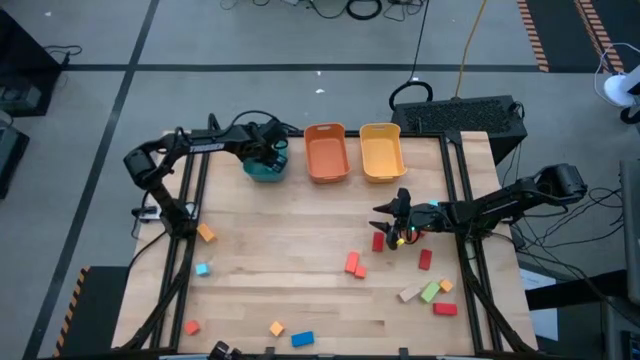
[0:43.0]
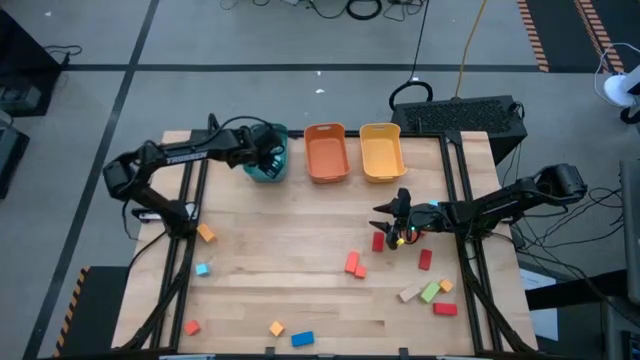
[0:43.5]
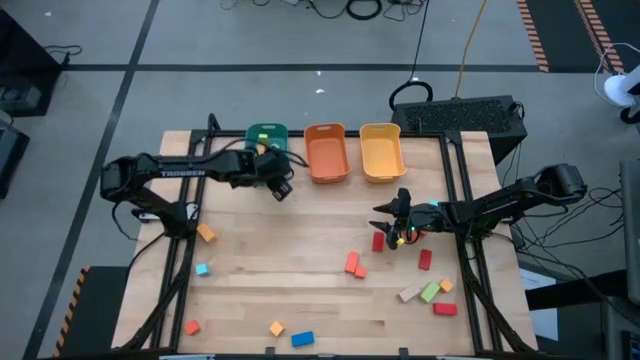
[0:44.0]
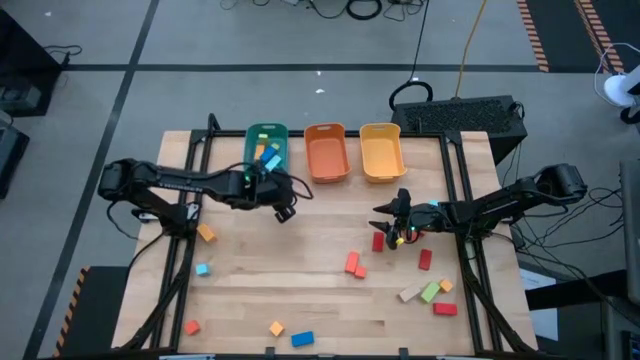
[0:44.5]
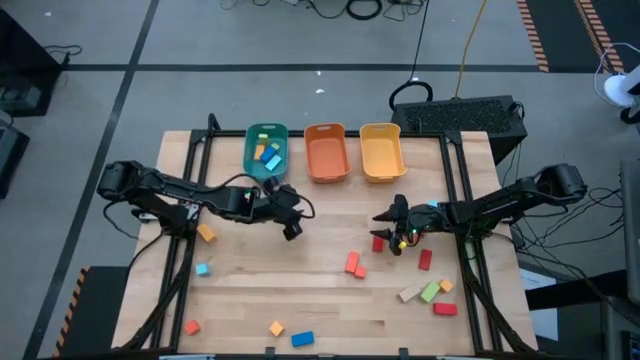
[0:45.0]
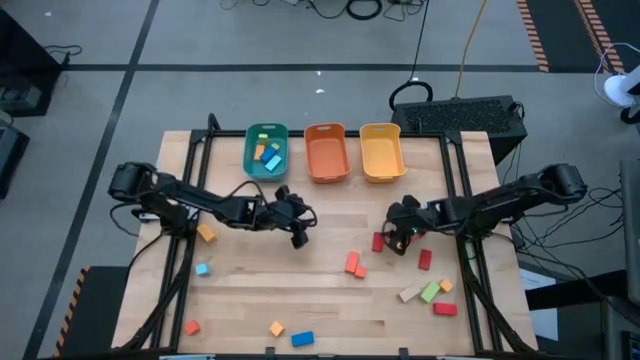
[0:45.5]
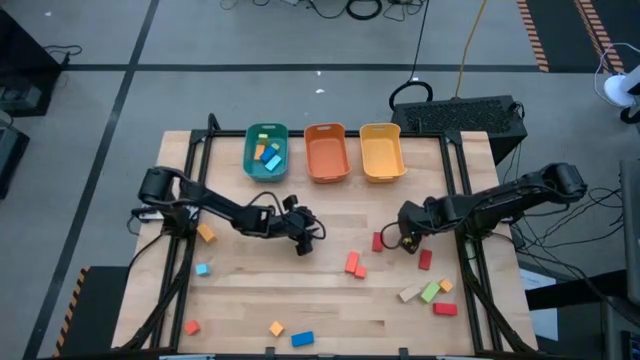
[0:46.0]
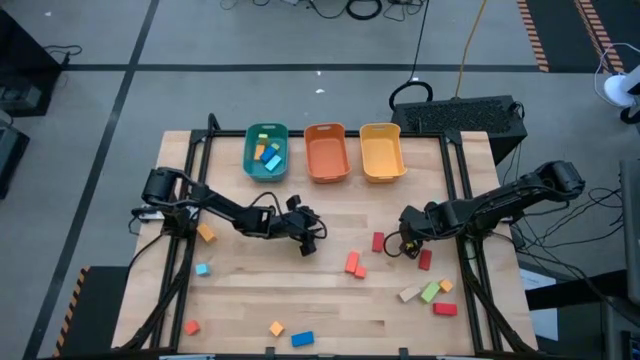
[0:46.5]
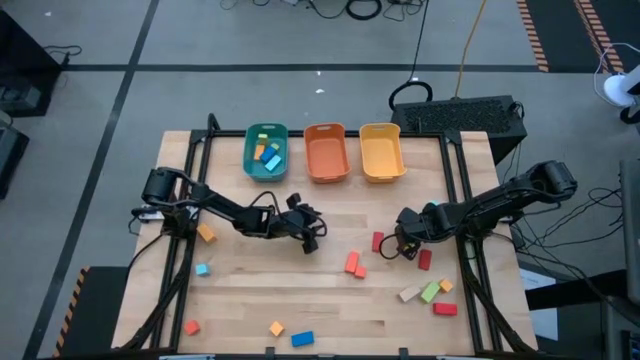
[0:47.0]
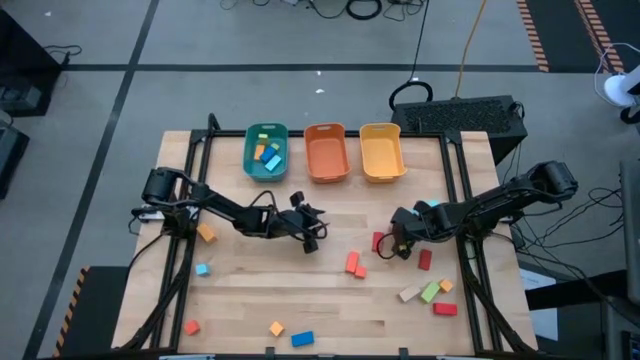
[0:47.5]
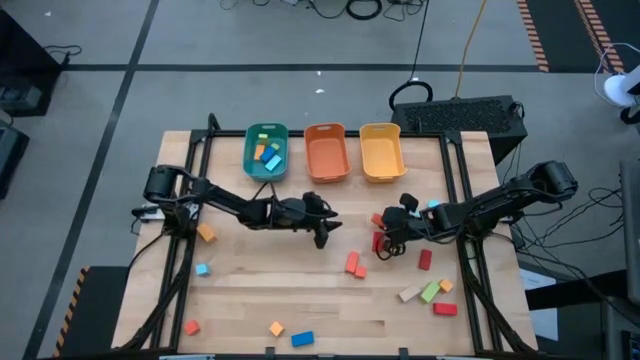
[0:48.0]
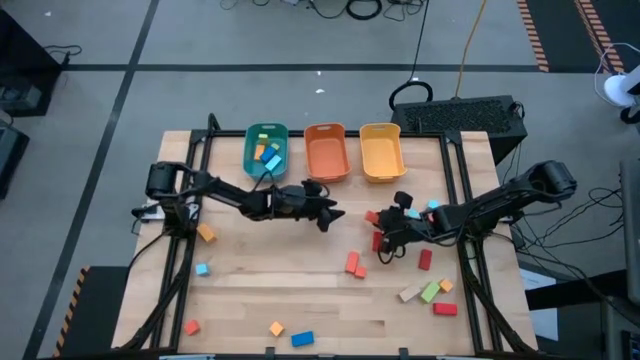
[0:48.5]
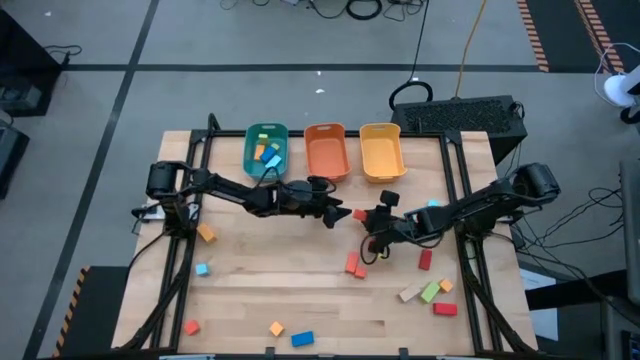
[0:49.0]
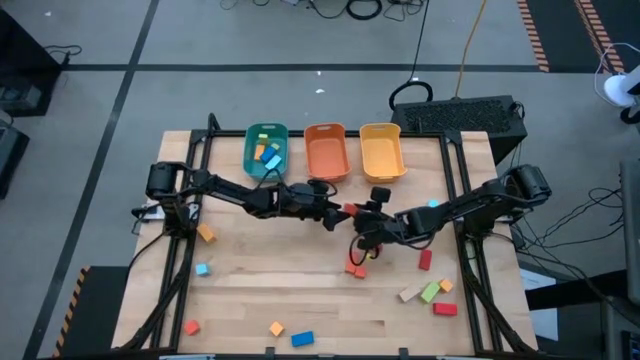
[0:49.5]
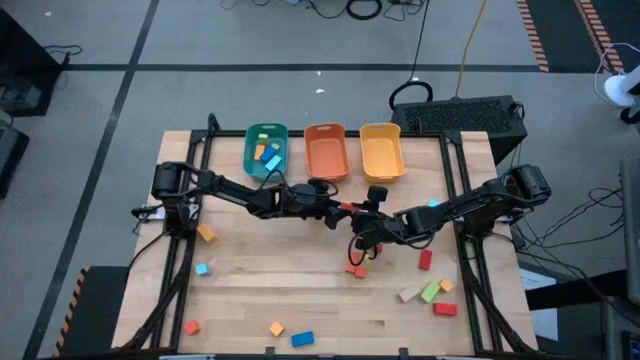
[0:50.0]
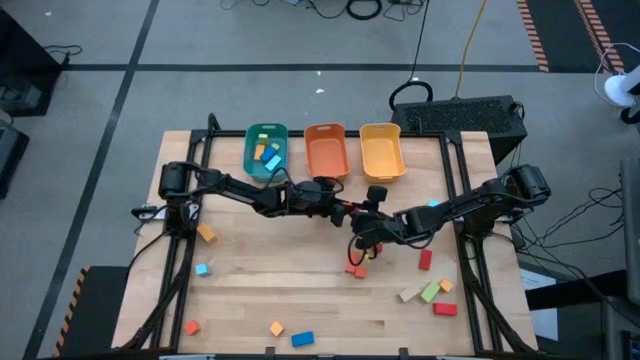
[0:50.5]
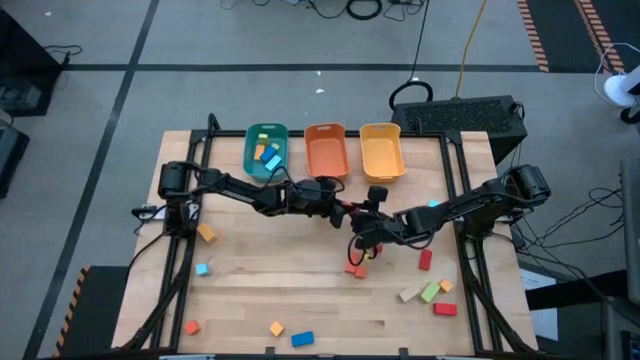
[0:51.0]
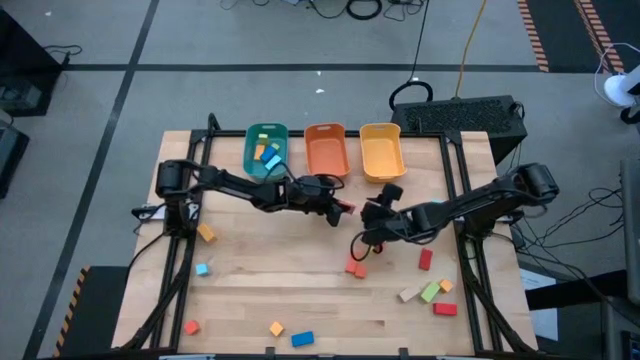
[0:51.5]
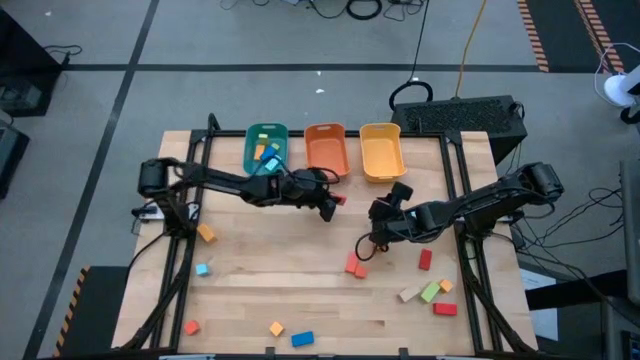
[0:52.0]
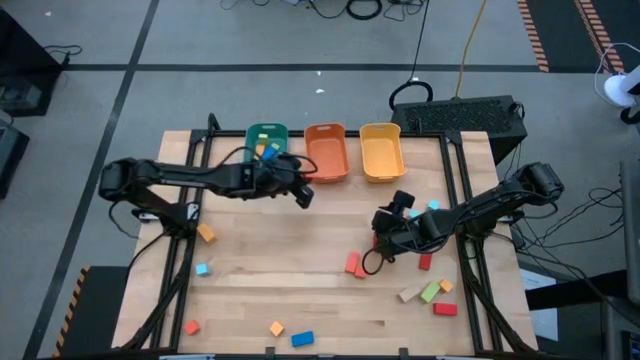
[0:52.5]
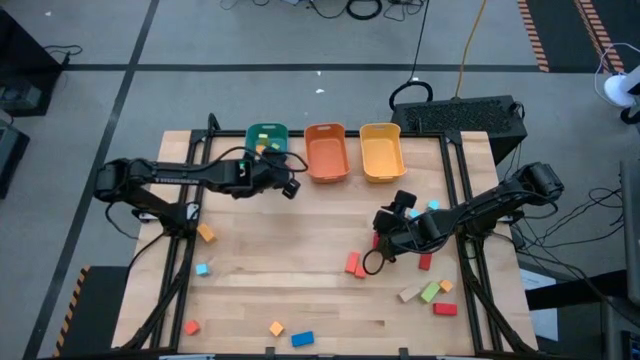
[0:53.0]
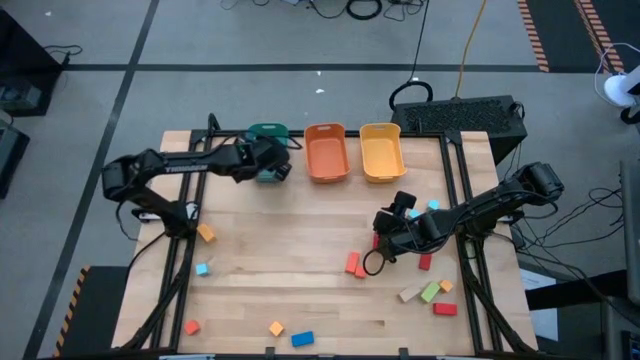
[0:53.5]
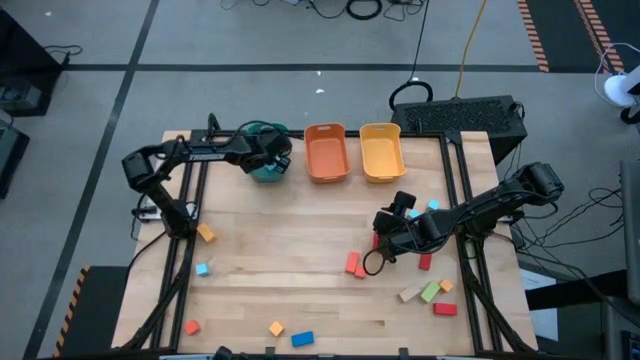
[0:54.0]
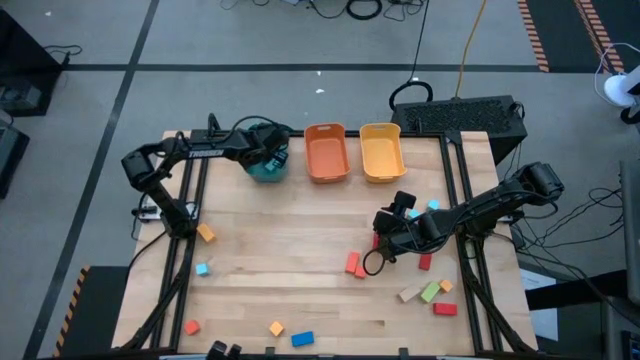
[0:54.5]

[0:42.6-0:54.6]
Task: Sort blocks by size
Put the right orange thin rectangular block into the blue bin

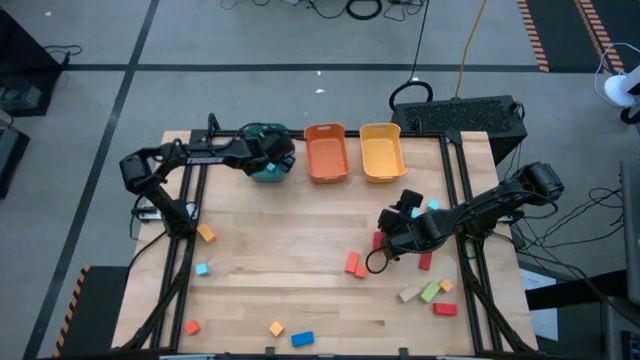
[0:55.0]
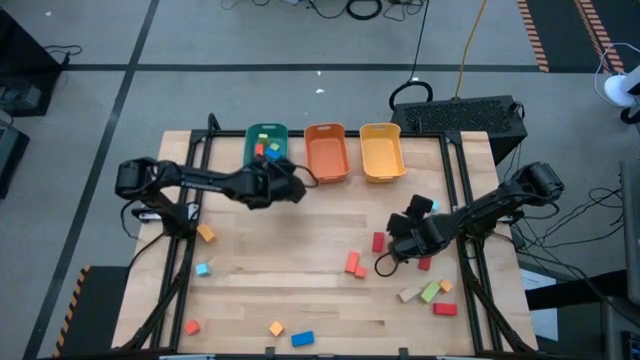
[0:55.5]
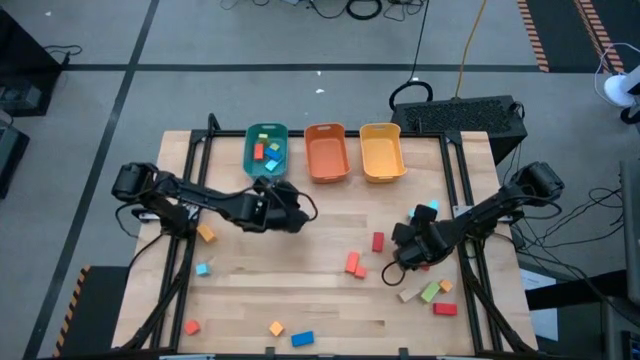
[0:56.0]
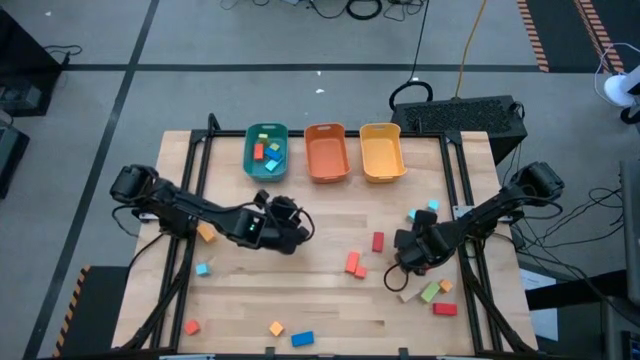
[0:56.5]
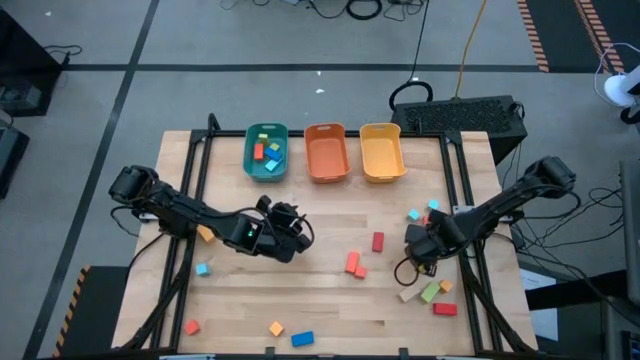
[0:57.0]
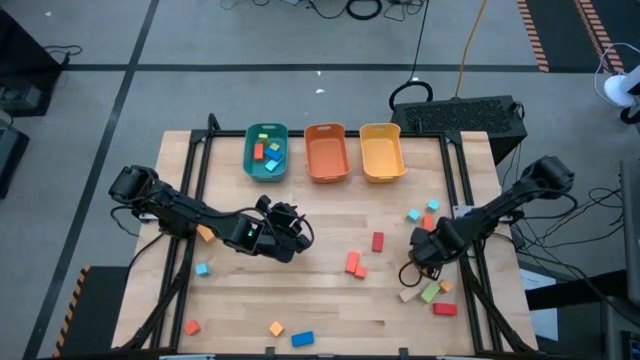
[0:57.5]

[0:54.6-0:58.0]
Adjust the right red thin rectangular block

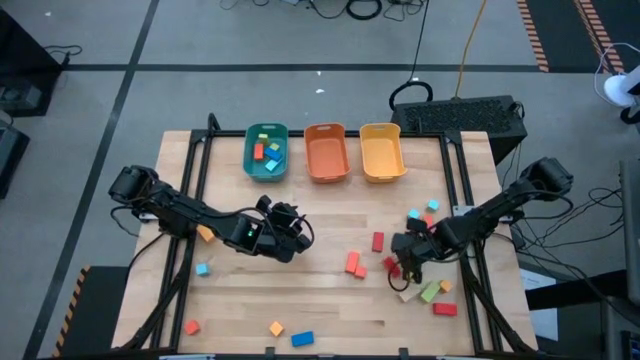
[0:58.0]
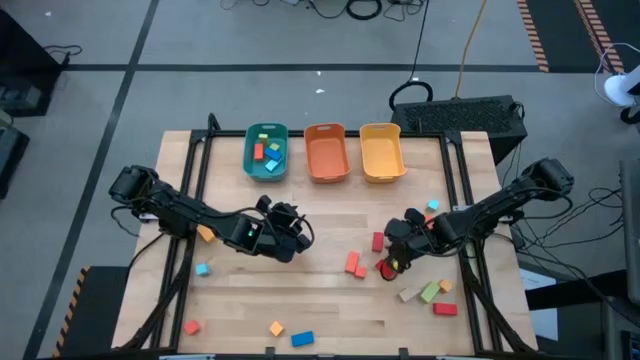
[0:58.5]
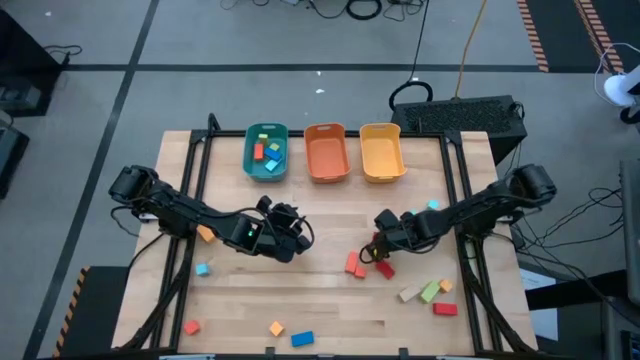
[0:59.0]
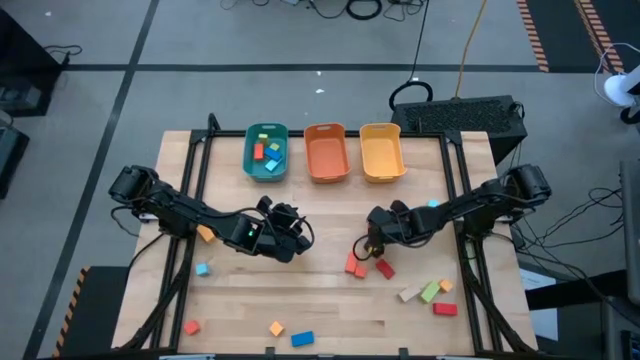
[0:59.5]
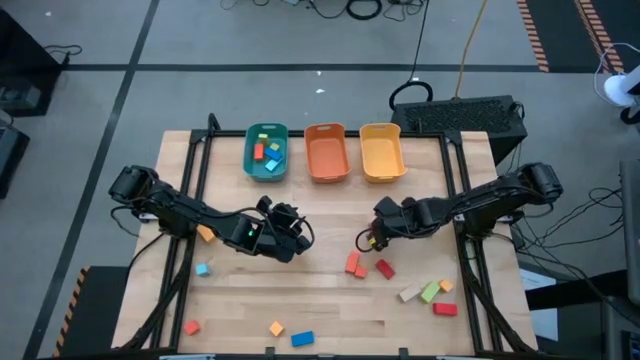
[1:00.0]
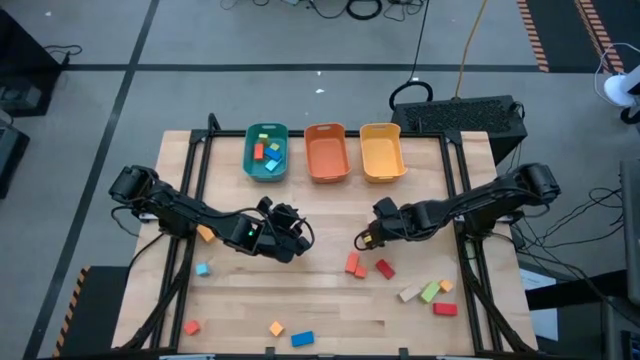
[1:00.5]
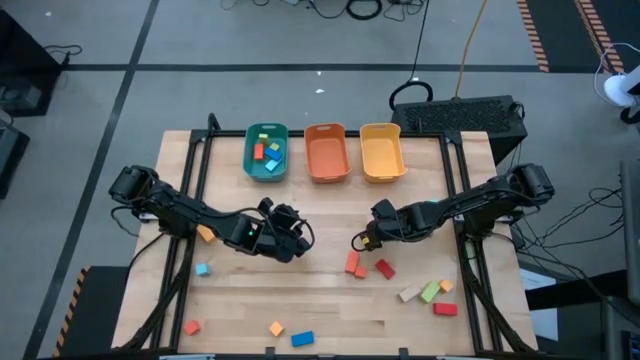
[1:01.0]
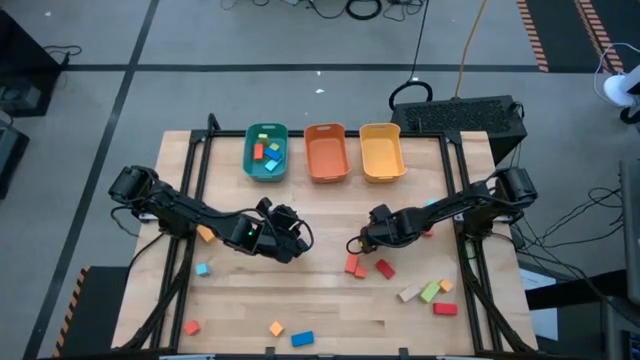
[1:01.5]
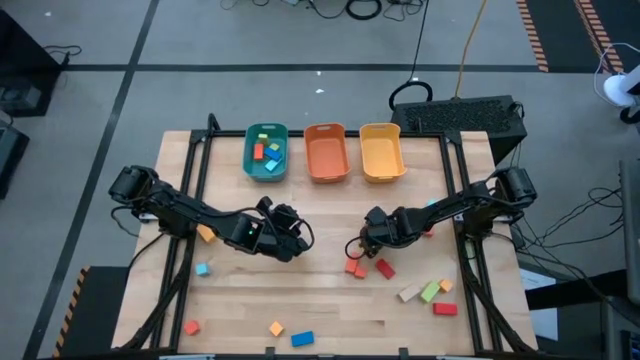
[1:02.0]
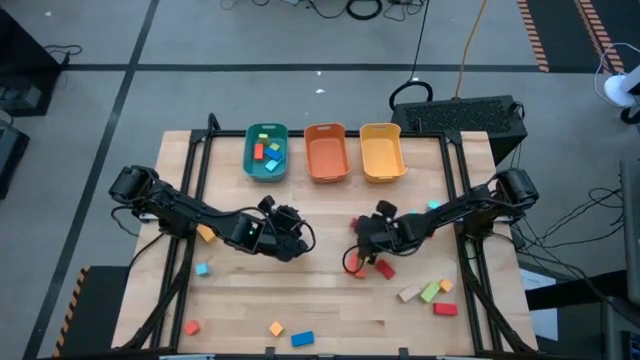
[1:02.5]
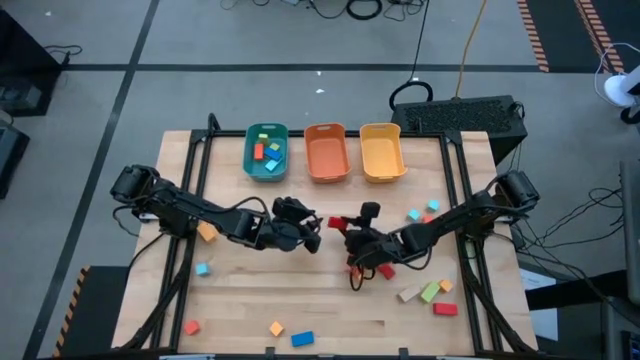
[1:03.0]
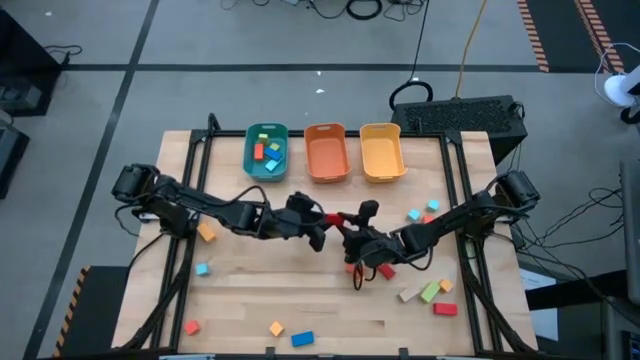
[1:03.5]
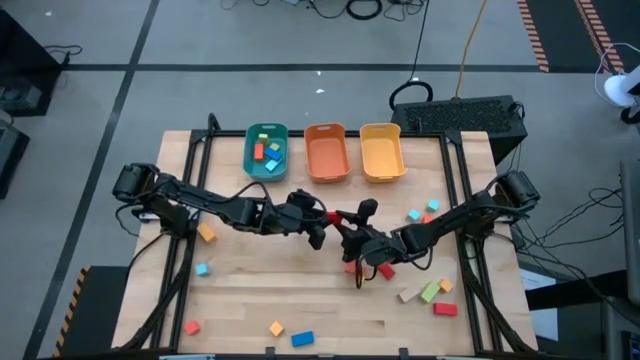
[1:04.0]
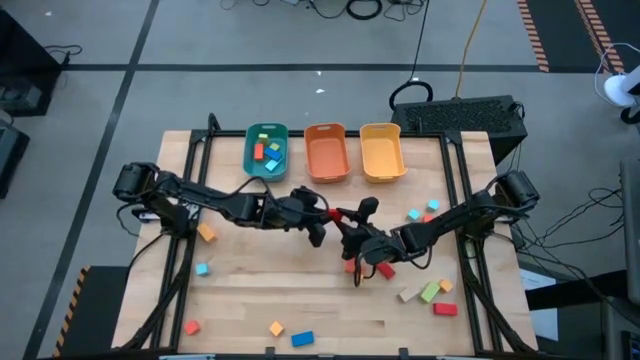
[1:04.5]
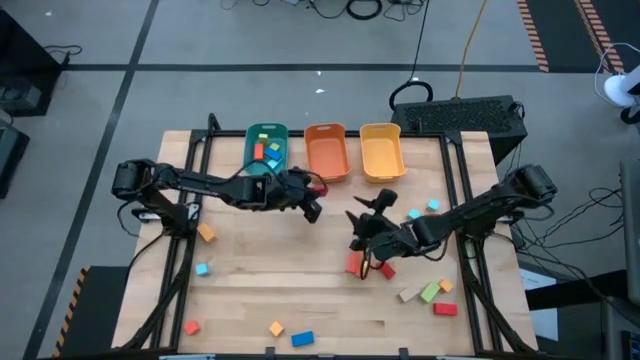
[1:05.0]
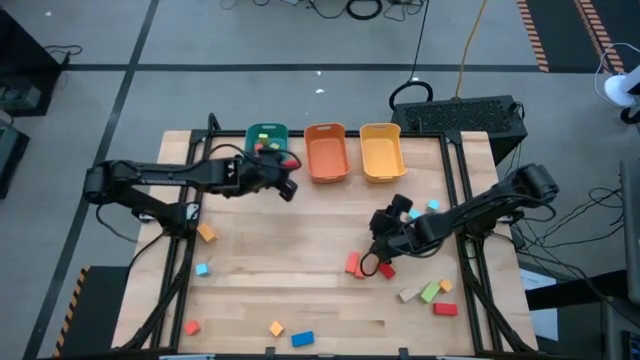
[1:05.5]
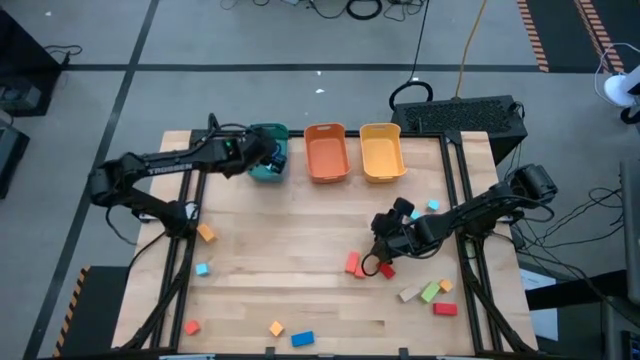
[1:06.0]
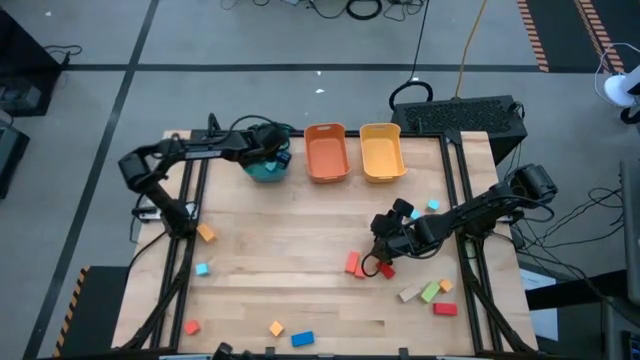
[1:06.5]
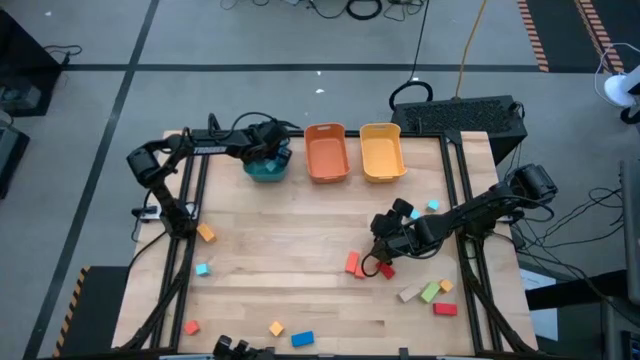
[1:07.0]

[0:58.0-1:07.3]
Put the red thin rectangular block into the blue bin
